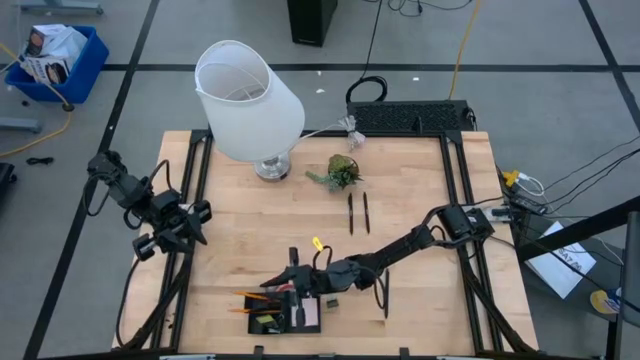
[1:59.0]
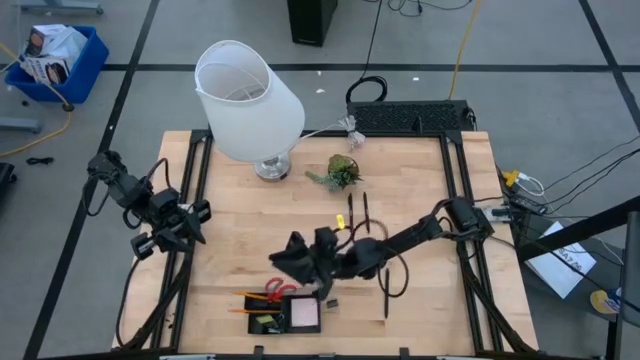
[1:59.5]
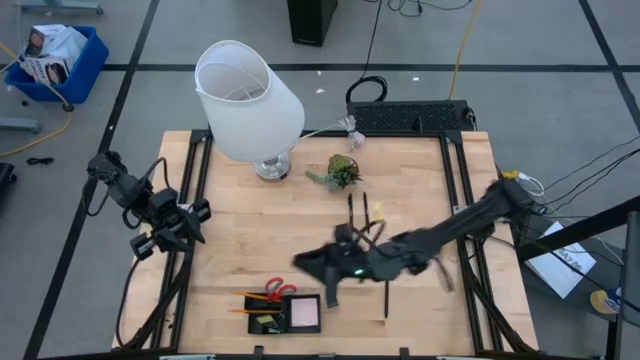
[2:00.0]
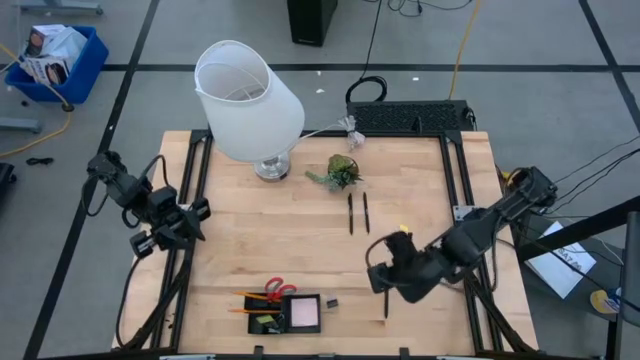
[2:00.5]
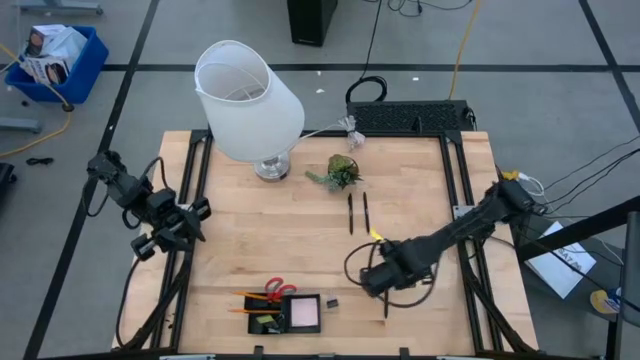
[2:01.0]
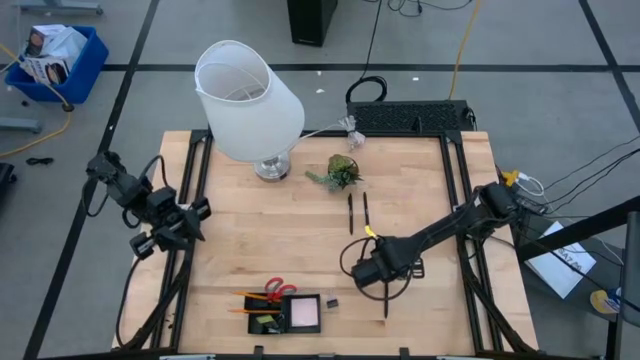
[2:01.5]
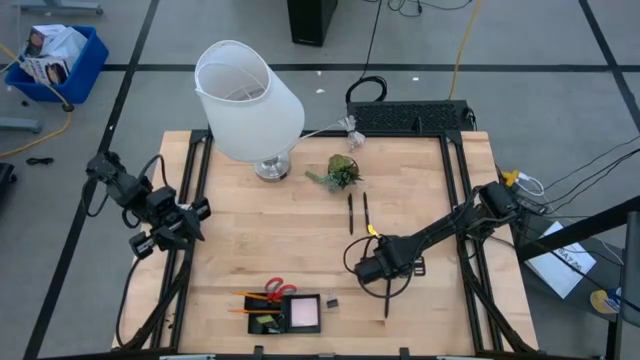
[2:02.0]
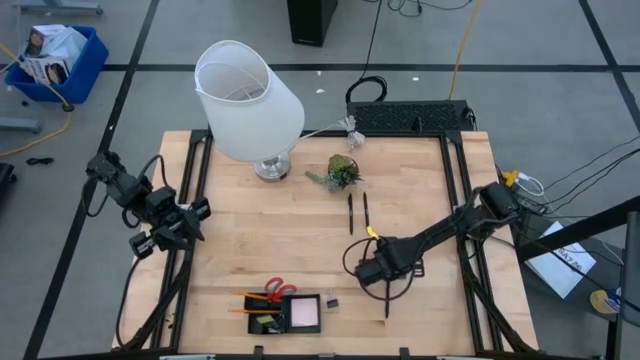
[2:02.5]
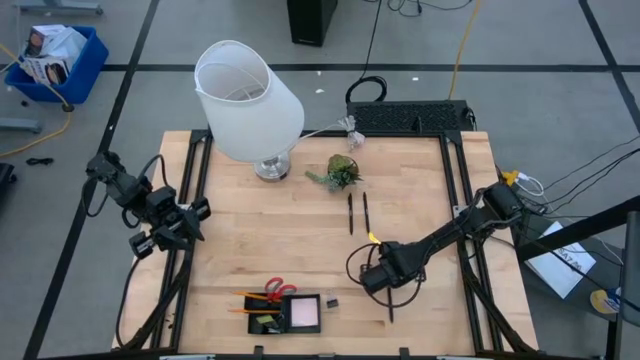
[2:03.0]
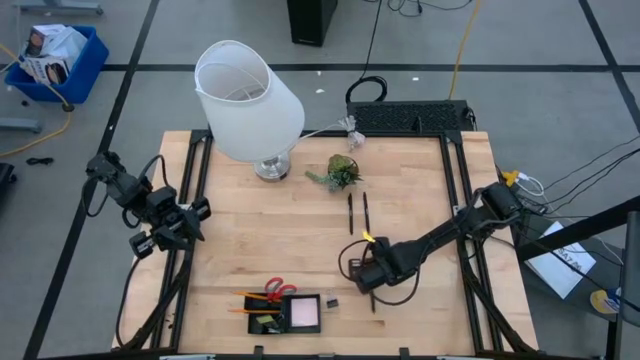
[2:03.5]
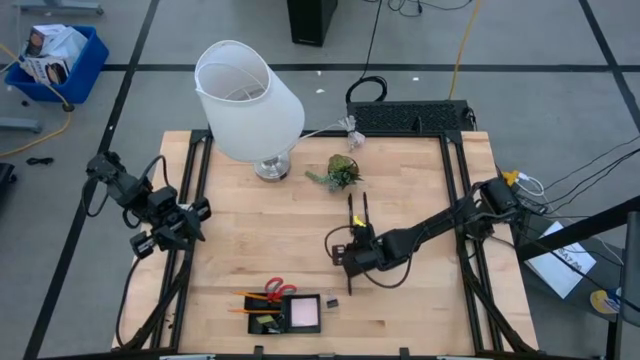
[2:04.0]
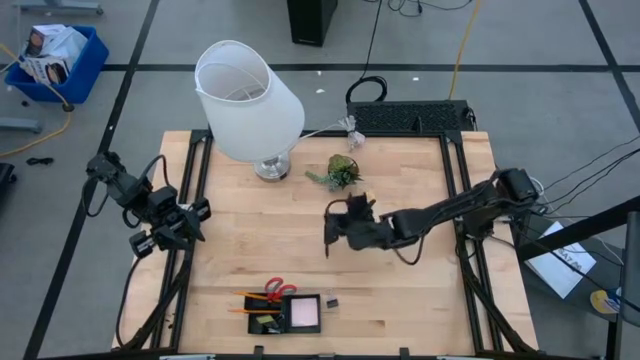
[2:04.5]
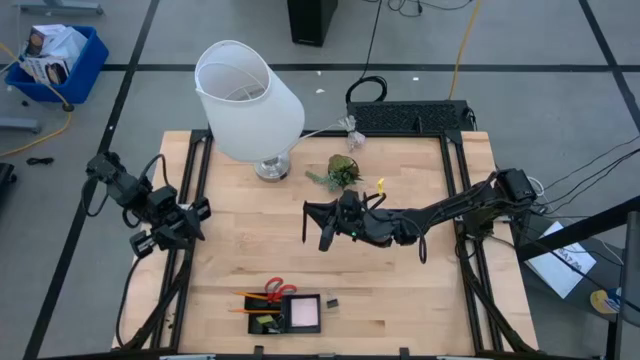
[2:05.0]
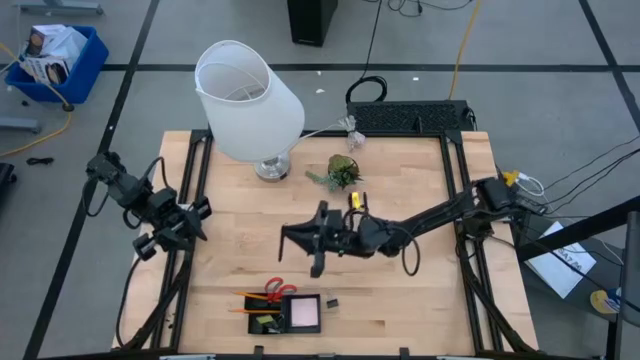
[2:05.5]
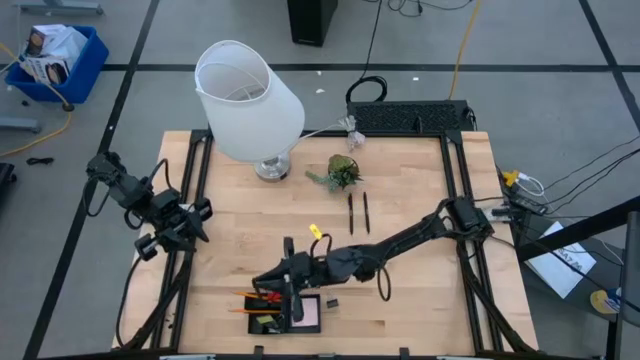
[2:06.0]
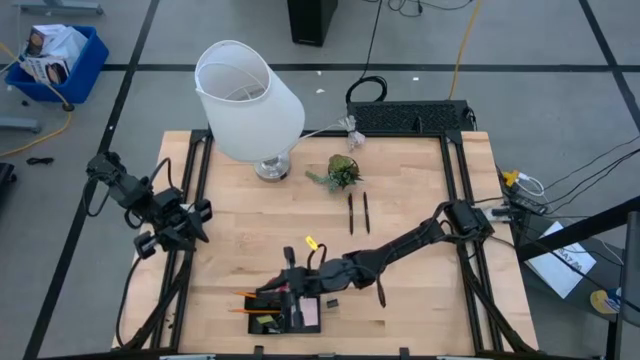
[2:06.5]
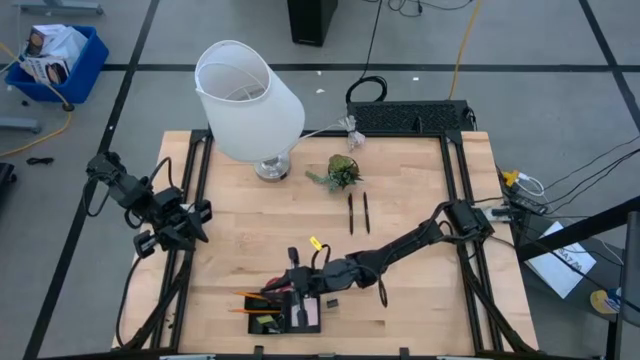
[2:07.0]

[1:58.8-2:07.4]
Task: Pick and place office supplies into organizer
Put the bottom black pen into the mesh desk organizer

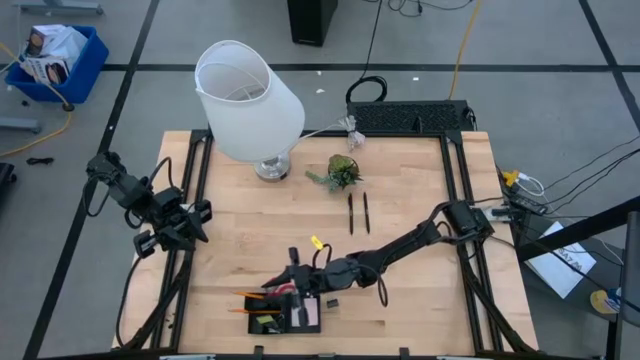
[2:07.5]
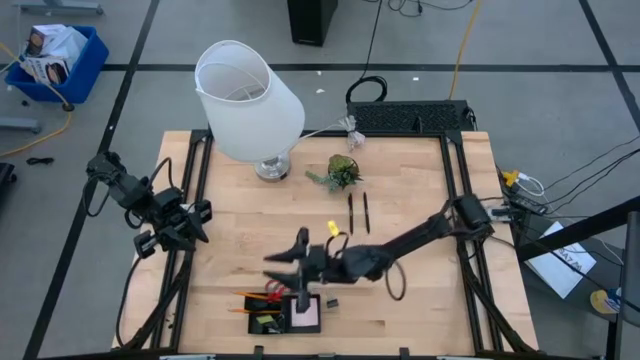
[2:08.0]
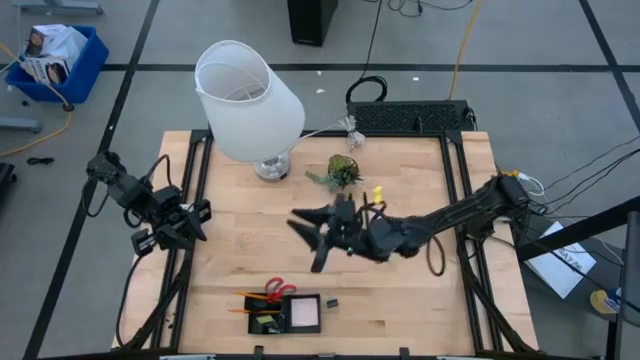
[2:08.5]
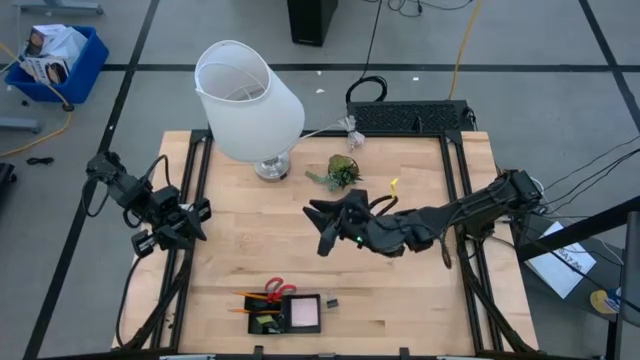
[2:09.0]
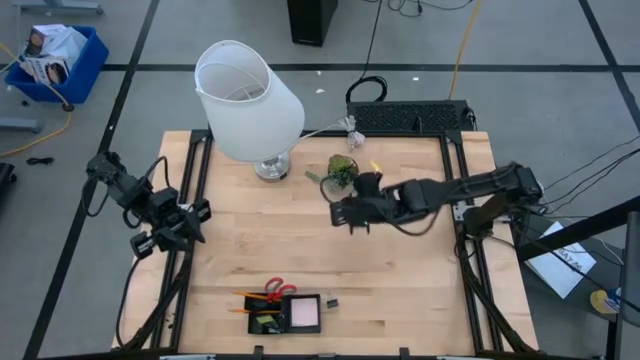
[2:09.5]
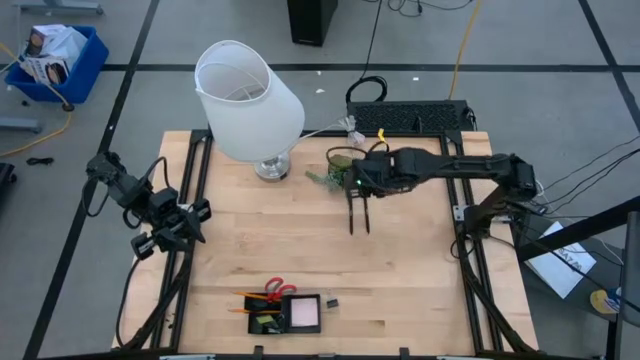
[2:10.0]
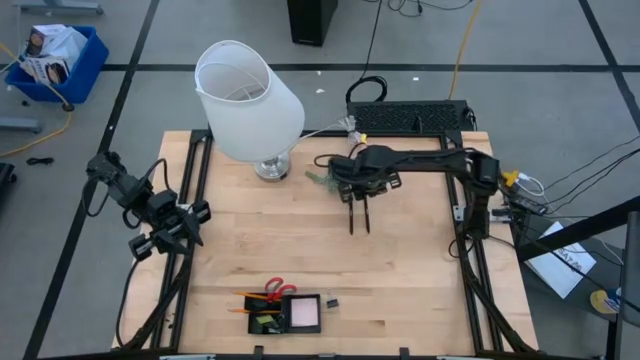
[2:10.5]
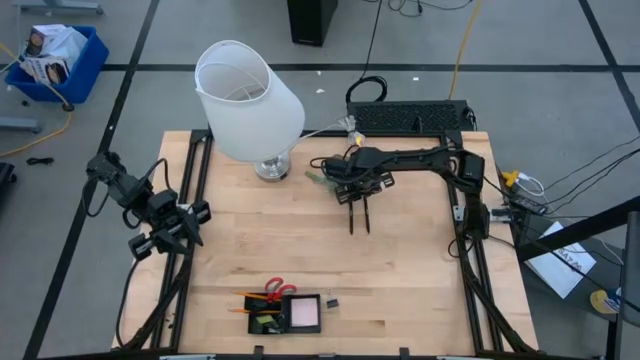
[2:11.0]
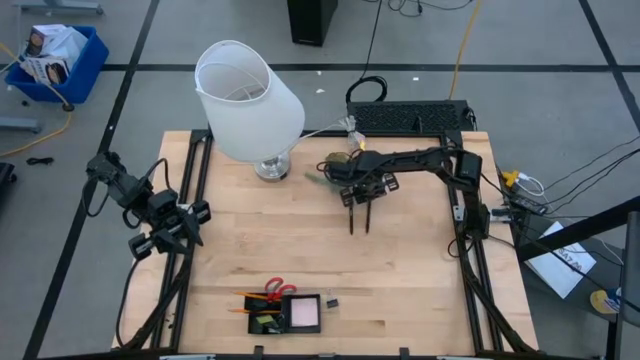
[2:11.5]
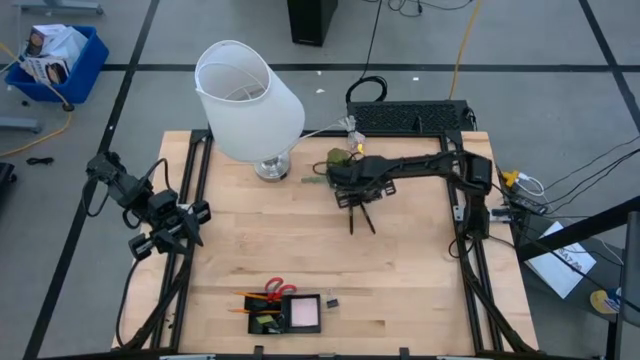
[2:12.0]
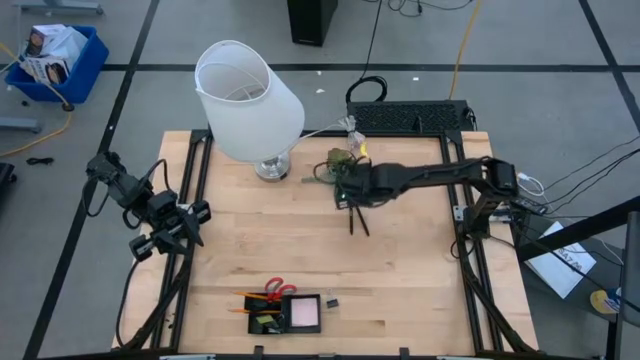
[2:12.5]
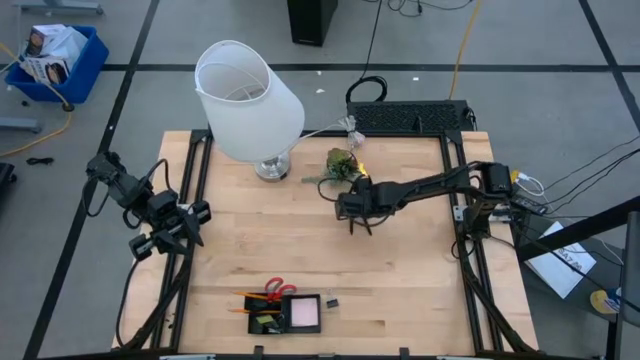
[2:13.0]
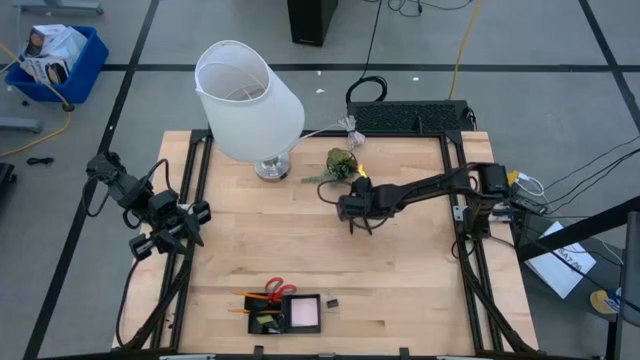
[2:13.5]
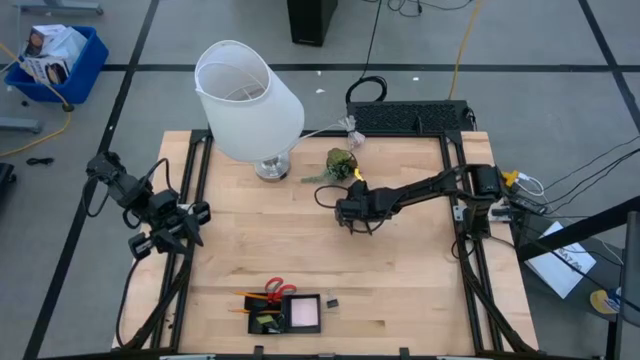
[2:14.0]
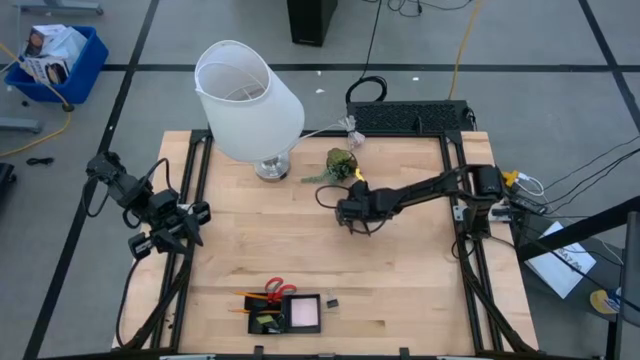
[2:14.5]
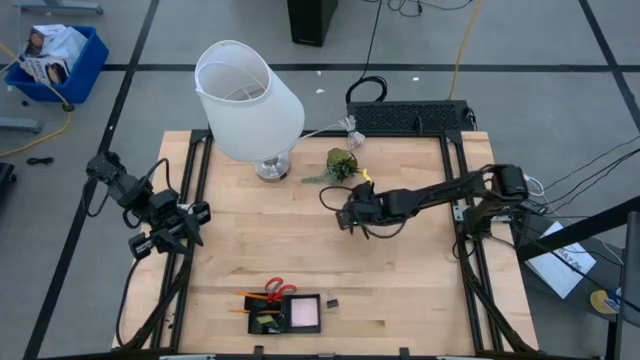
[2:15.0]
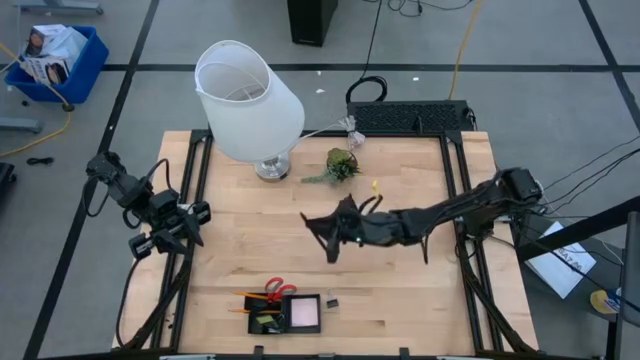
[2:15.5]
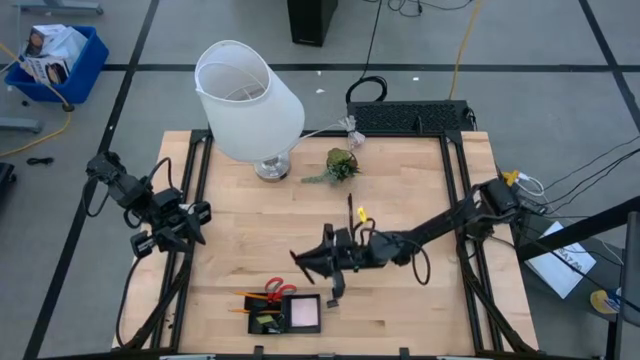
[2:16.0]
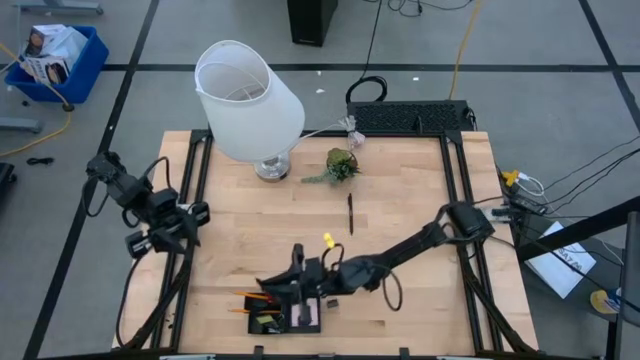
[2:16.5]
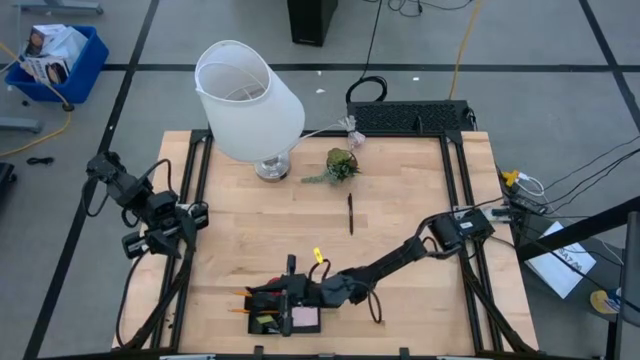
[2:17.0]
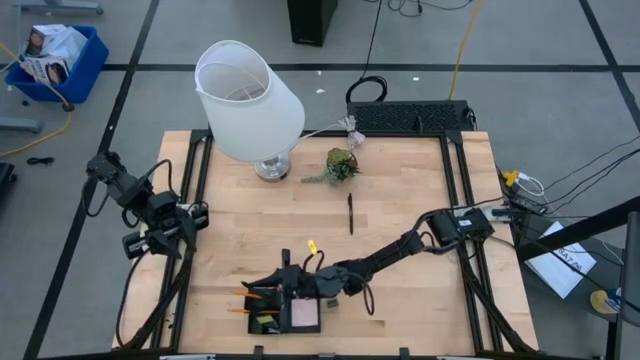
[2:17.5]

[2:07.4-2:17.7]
Put the right black pen into the mesh desk organizer

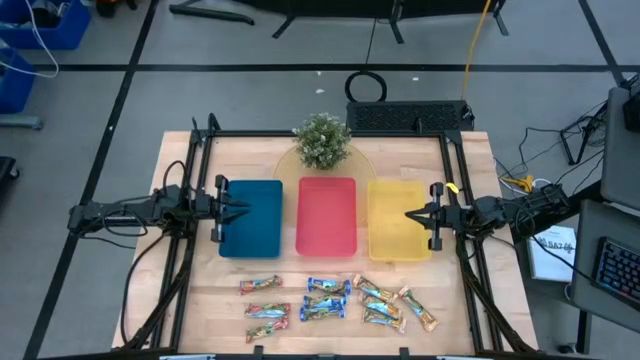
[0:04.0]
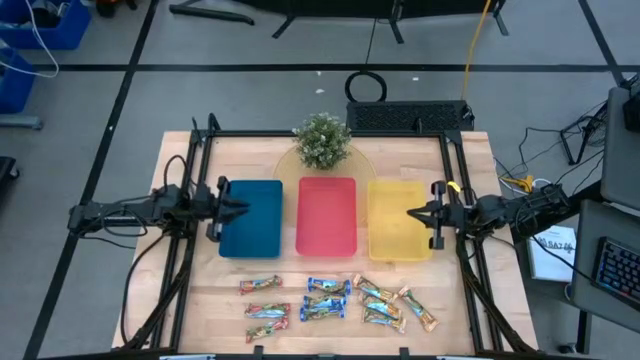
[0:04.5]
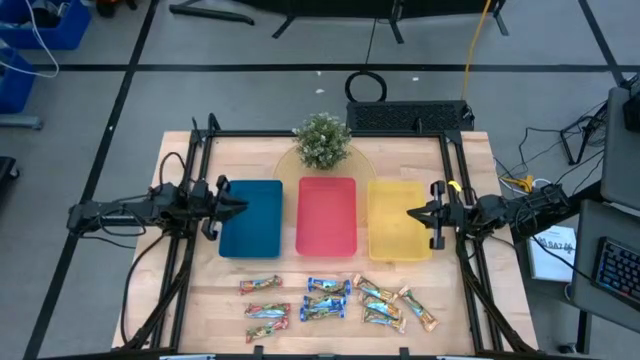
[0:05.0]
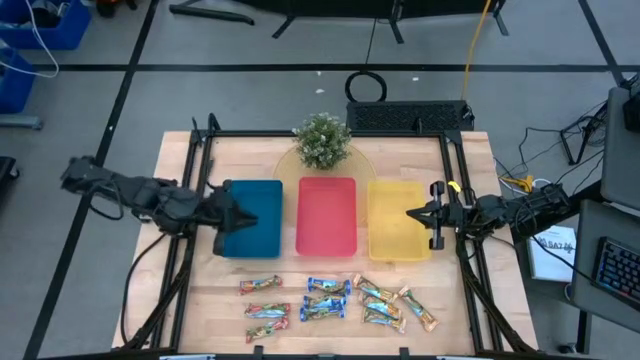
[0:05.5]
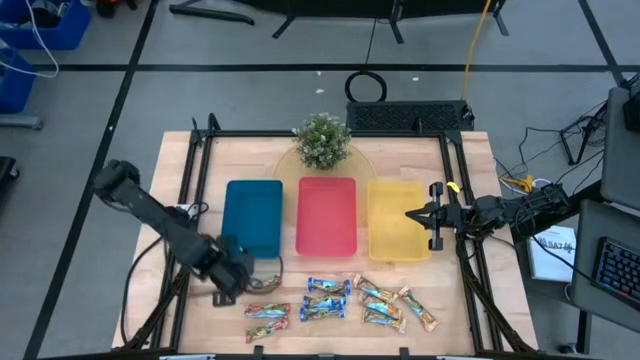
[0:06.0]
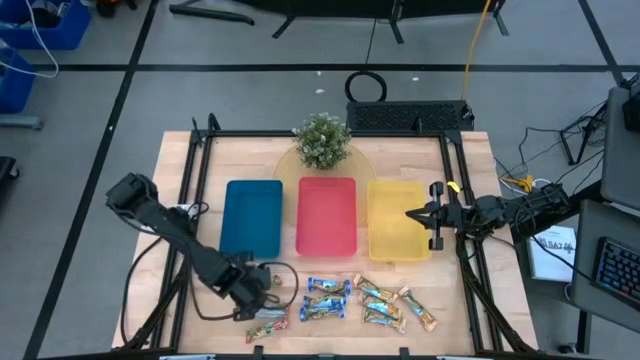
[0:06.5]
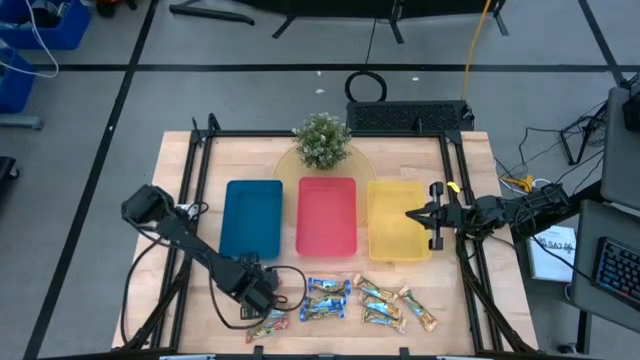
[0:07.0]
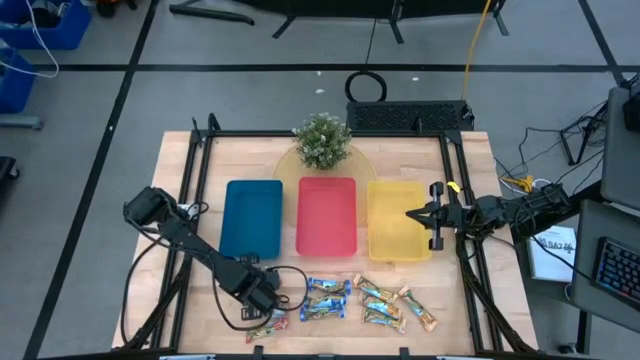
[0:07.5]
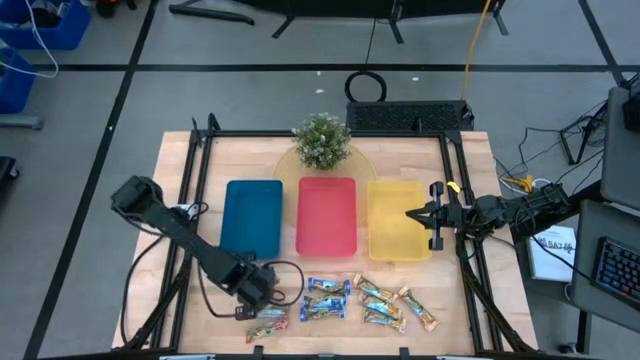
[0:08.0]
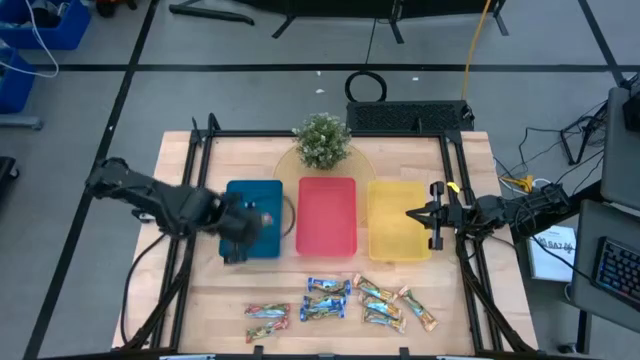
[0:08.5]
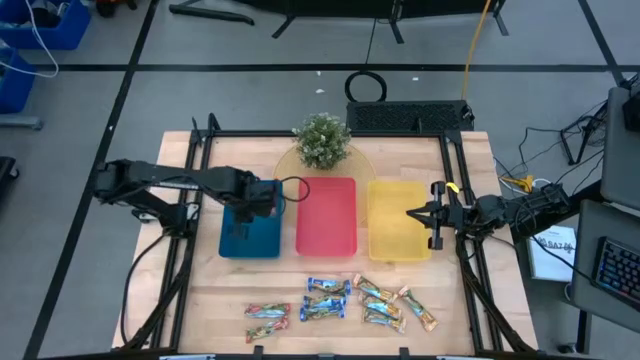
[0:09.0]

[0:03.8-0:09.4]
Task: Pick and place Granola Bars by type
Put the top red granola bar into the blue bin
